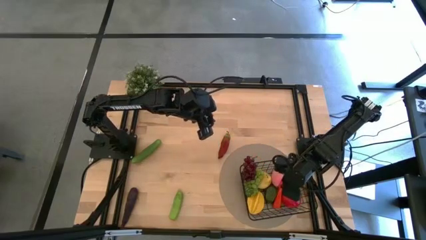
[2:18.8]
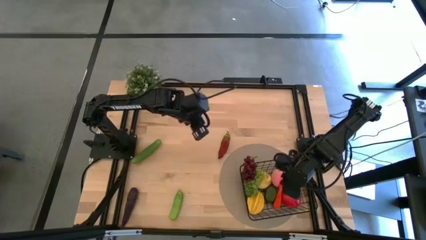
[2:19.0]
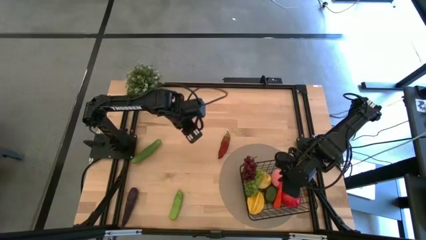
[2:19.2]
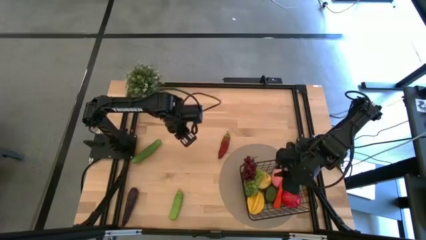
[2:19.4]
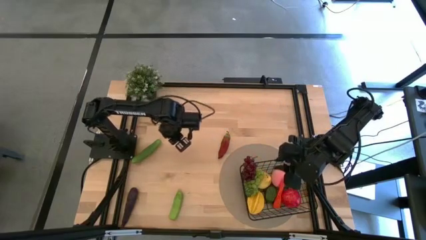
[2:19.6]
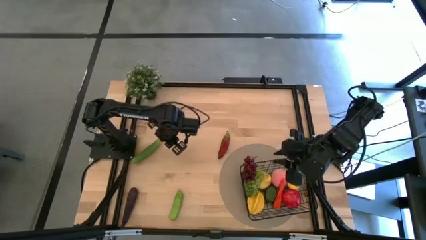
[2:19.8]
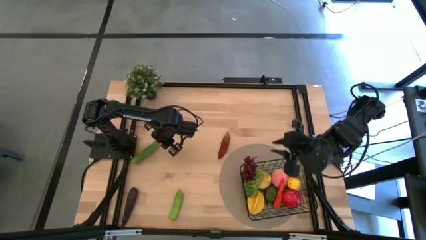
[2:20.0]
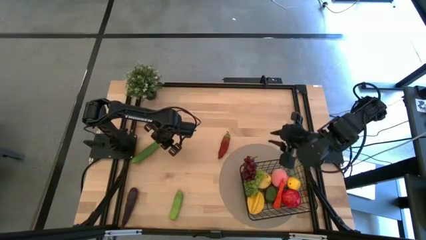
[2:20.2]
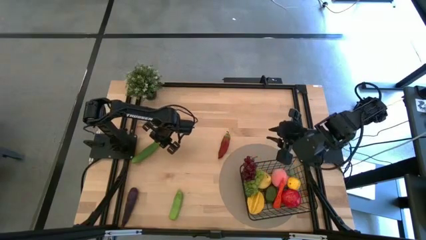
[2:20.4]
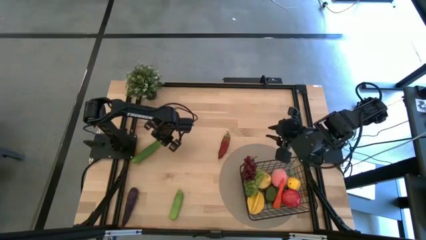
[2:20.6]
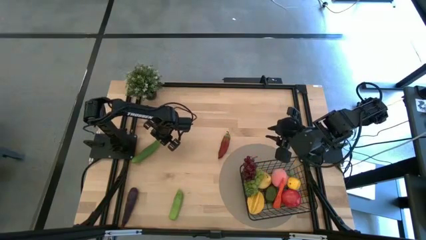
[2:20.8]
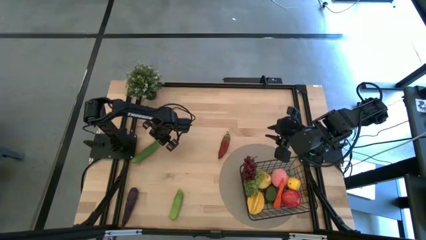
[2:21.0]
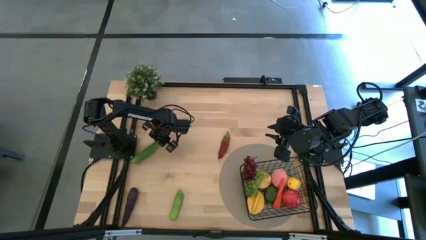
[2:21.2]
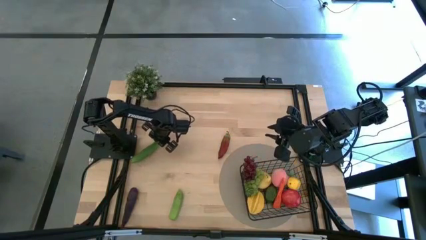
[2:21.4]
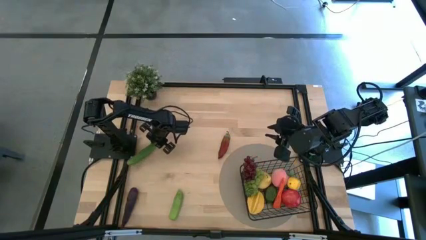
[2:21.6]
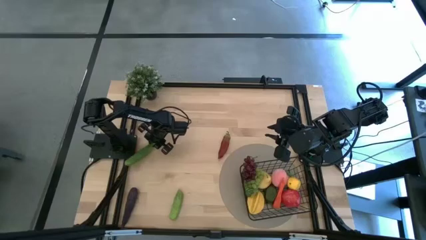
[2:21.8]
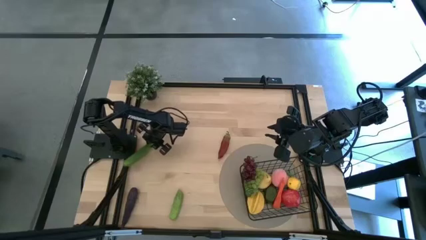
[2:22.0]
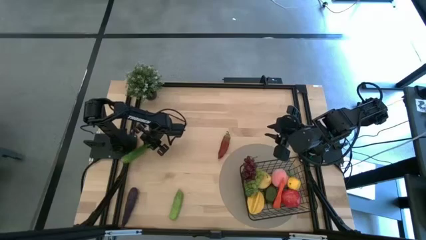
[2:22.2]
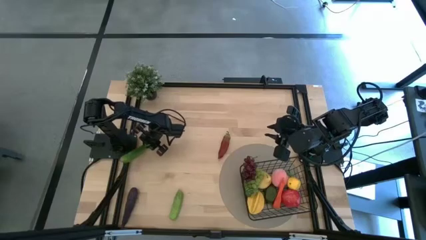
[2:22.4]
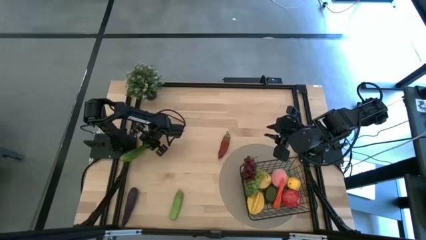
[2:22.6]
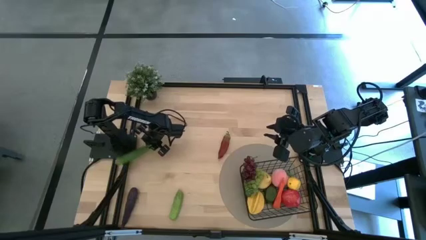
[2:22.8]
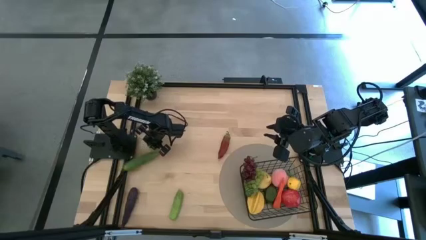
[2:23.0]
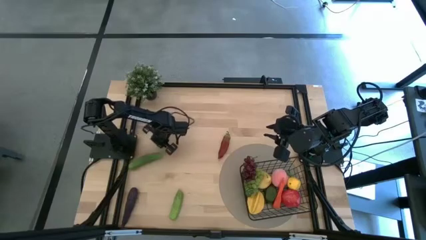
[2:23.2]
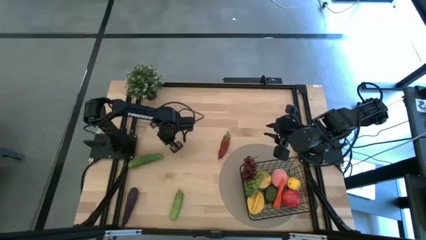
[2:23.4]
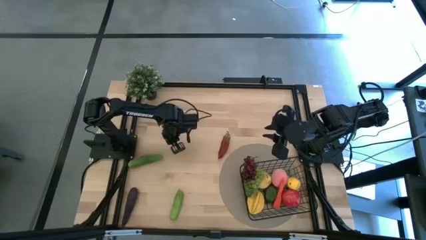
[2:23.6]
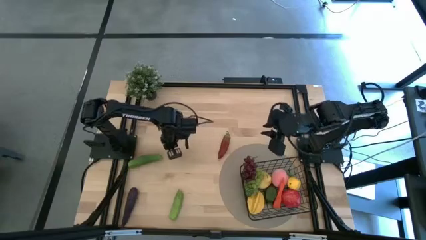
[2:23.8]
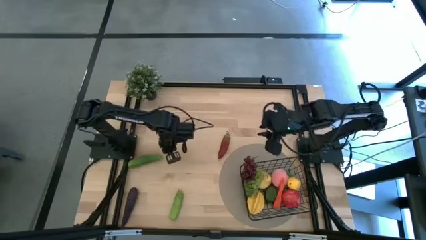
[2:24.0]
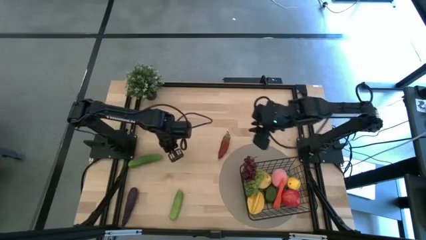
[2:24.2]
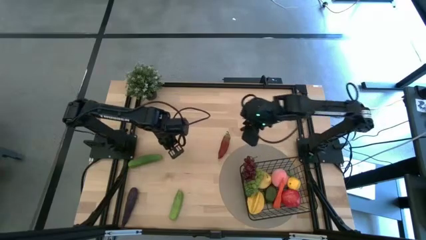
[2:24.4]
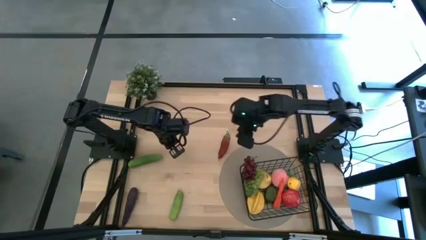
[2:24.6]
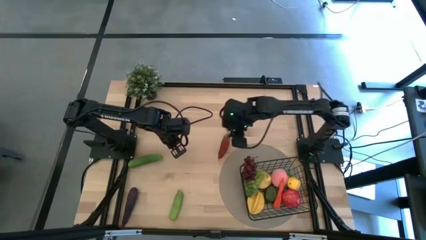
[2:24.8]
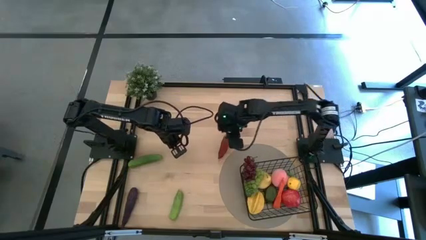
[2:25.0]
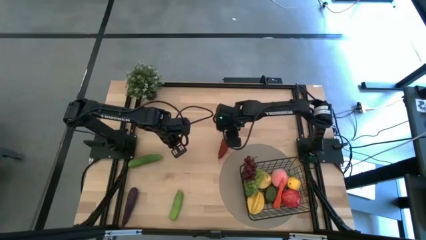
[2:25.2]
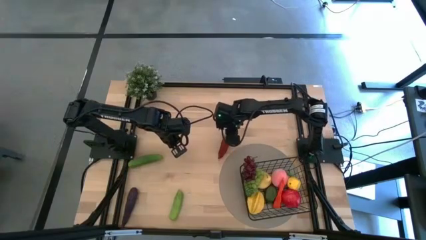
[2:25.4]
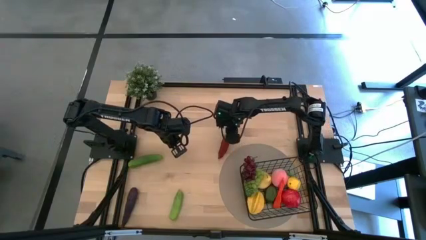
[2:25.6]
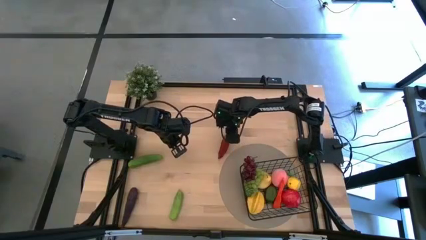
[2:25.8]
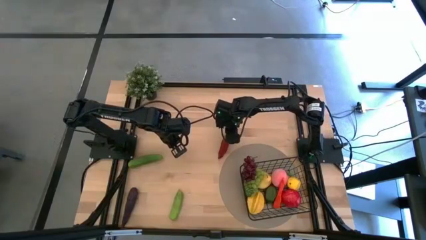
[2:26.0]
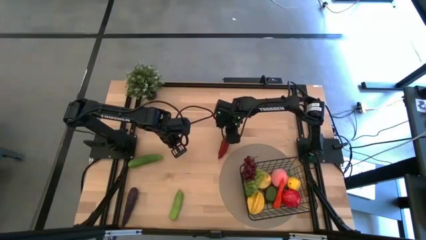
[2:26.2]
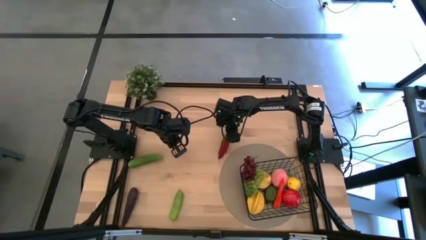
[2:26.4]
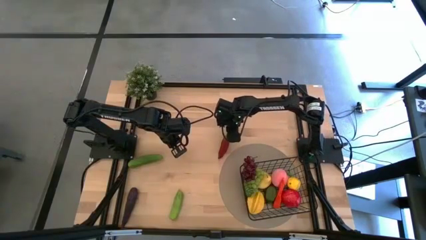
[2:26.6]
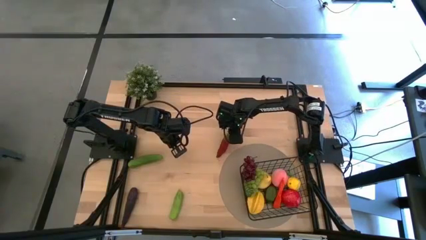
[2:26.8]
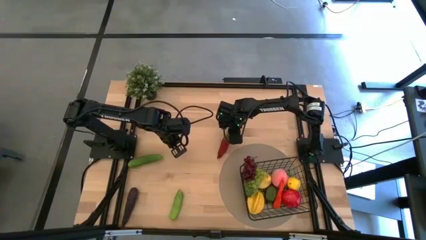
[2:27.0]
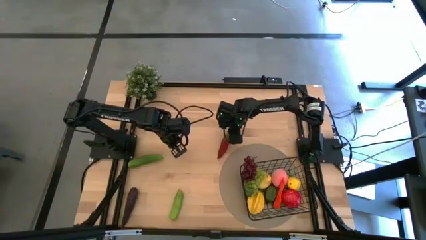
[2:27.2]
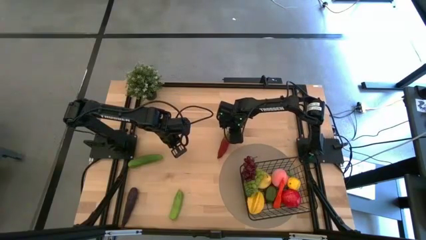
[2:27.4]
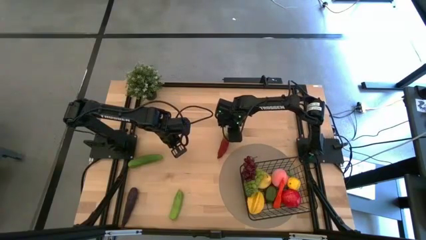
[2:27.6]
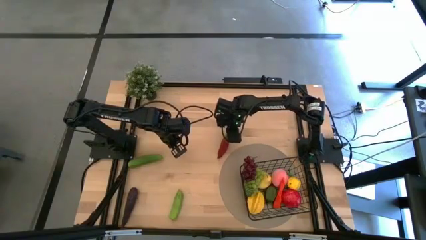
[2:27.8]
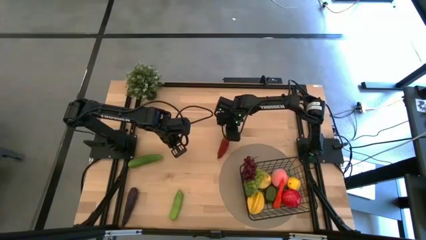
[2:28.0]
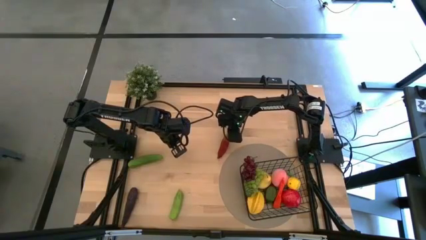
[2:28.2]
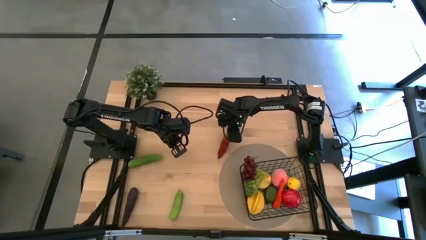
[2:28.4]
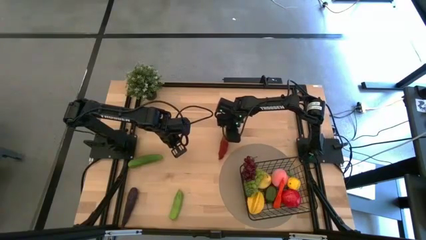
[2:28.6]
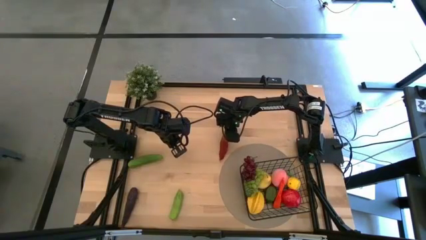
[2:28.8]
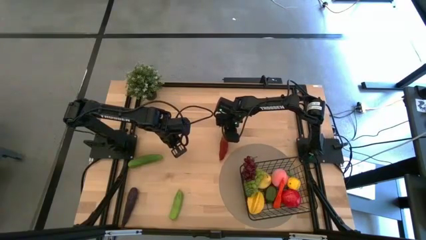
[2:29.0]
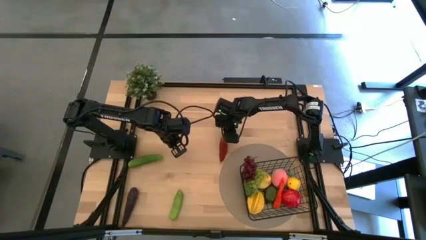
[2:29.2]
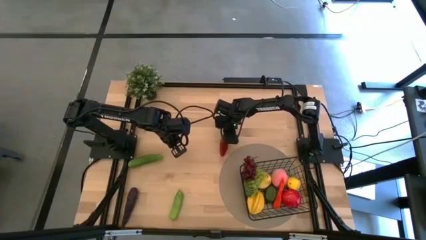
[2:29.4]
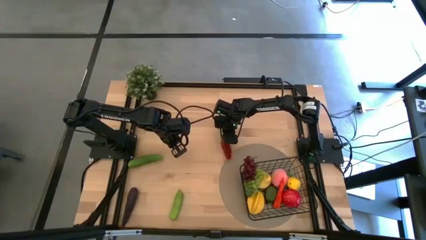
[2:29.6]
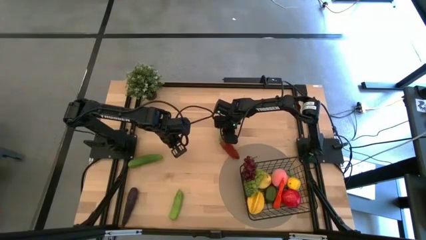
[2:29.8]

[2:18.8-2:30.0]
Task: Build produce basket
Put the red chili pepper into the wire basket

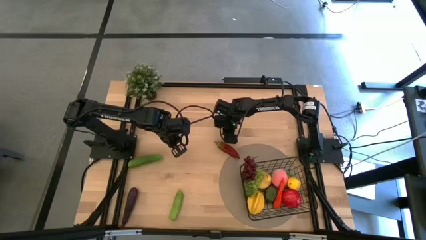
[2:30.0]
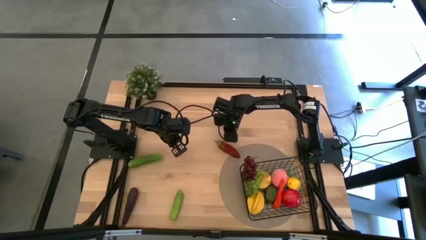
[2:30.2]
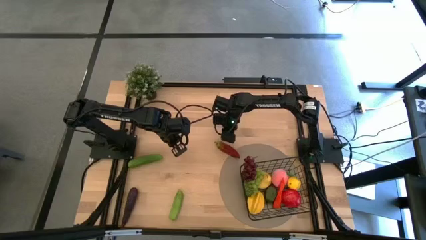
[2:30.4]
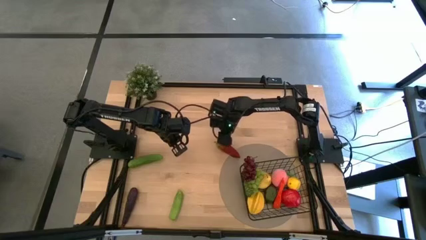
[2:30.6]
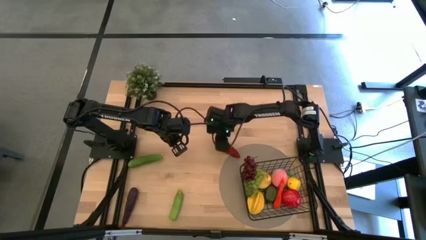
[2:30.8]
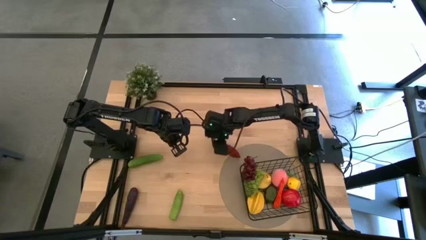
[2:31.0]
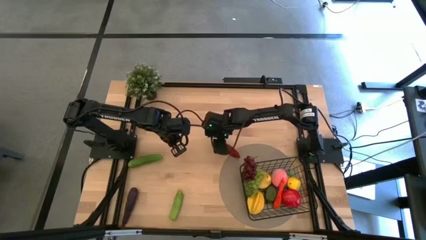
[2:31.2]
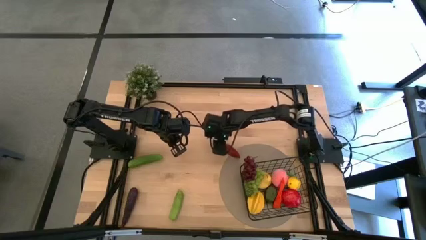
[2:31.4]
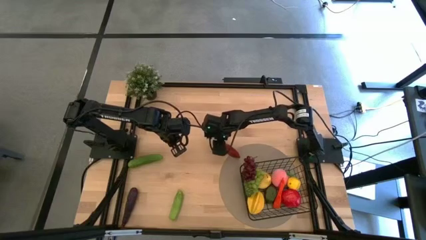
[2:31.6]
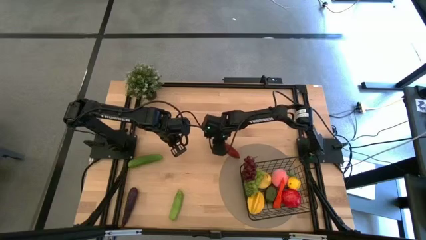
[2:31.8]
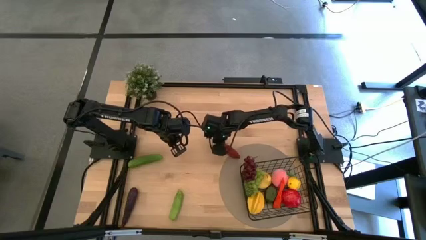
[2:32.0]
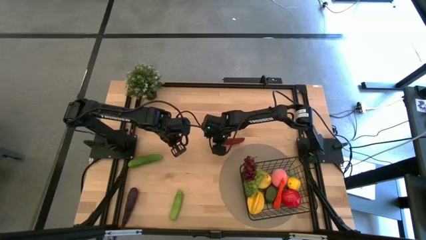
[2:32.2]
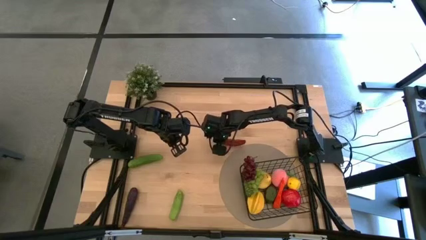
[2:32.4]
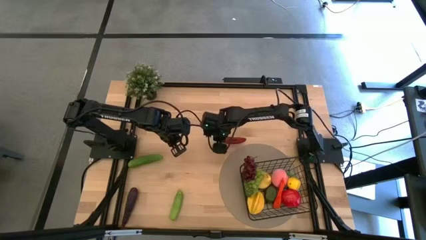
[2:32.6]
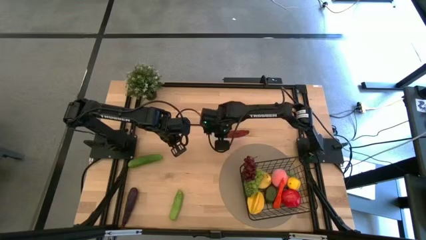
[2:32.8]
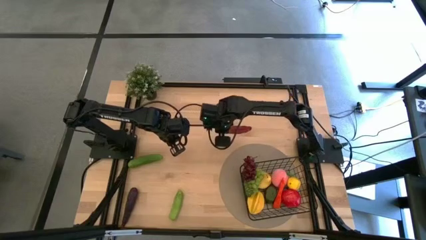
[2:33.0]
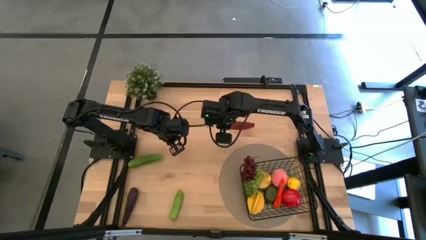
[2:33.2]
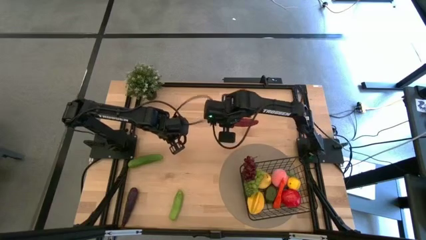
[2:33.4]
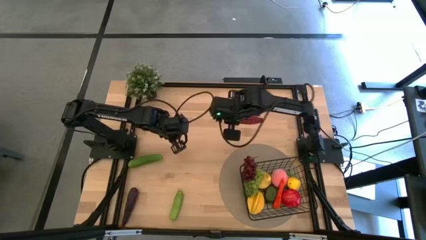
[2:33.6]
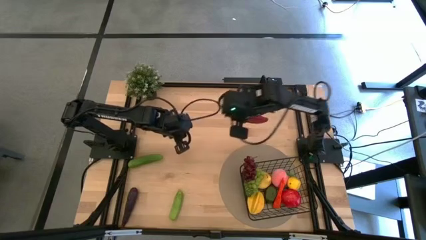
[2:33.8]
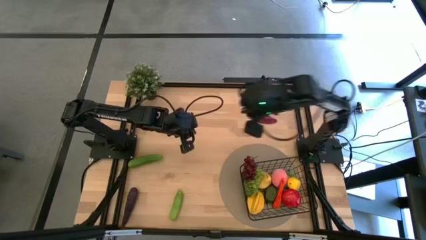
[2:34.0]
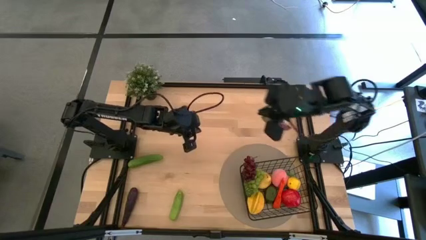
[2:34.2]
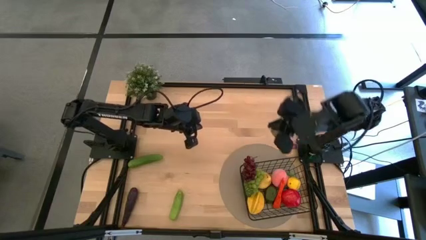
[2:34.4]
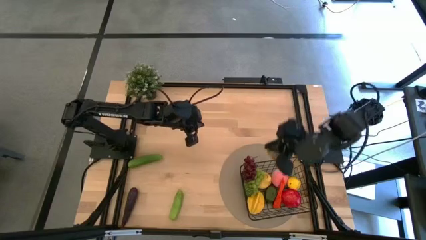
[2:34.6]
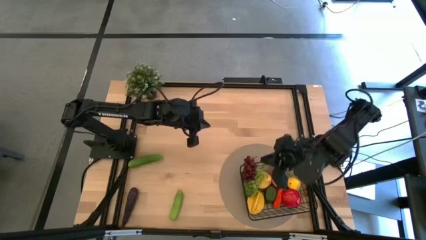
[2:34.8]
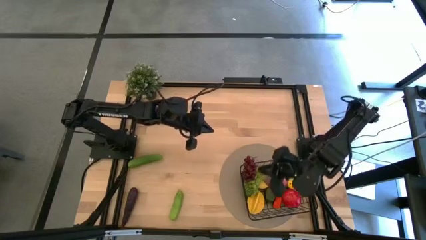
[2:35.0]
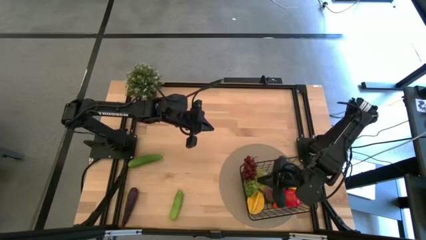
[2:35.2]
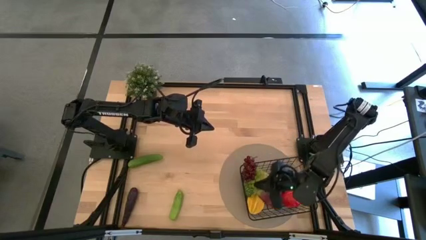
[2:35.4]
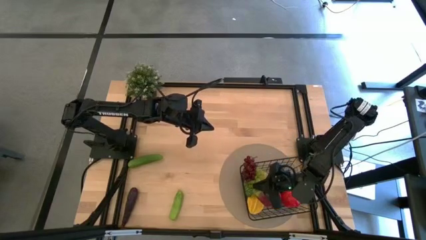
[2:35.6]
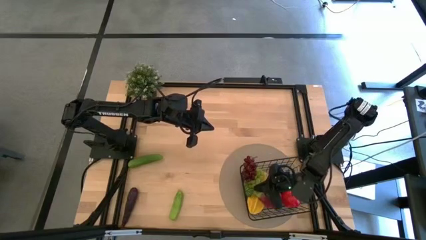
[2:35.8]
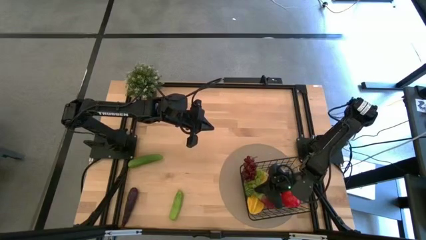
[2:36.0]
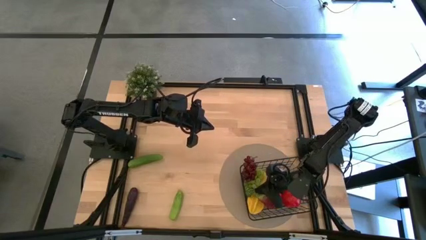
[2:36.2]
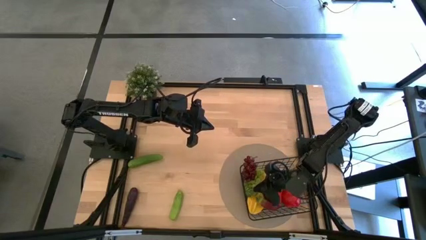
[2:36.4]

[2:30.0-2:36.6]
Put the red chili pepper into the wire basket
